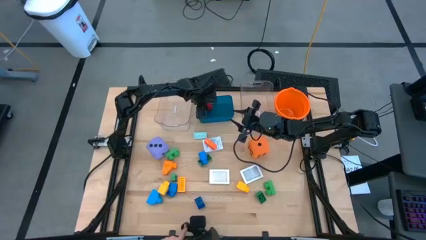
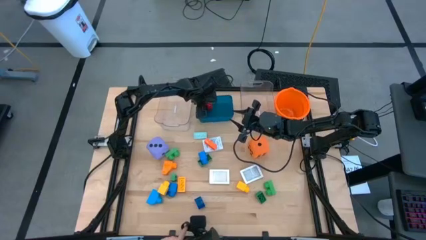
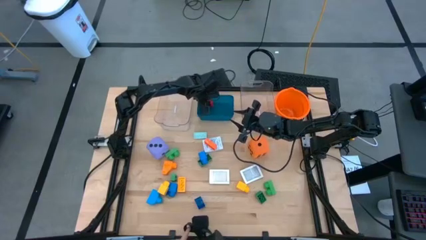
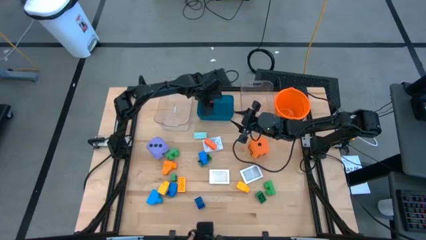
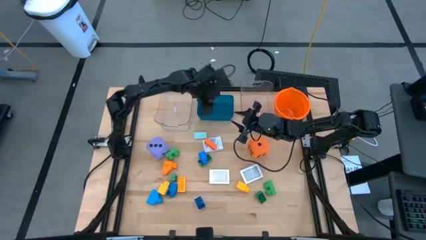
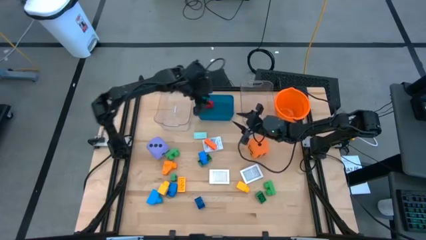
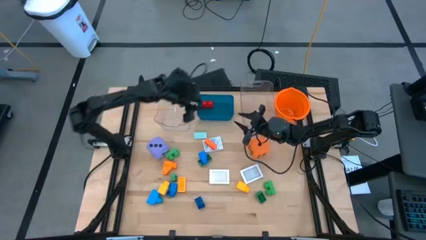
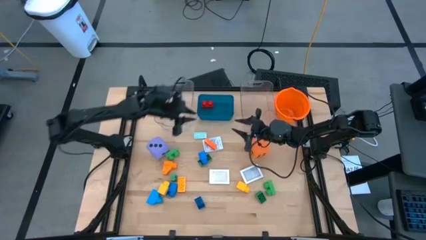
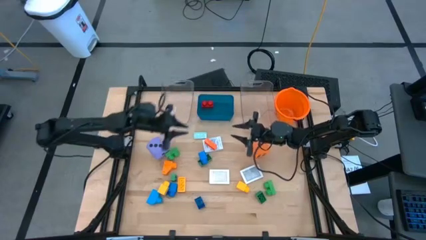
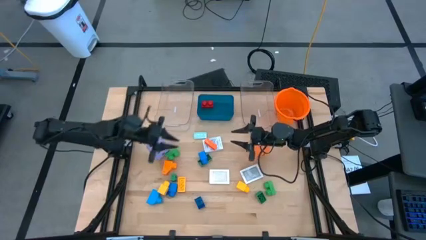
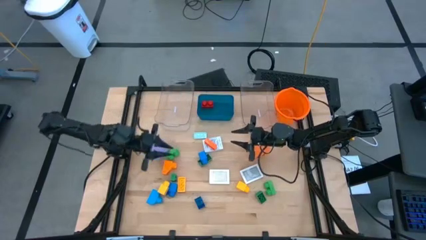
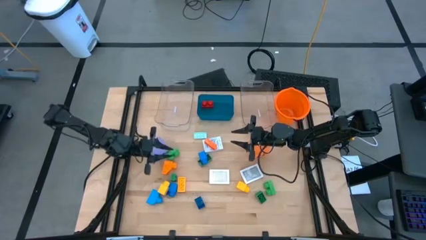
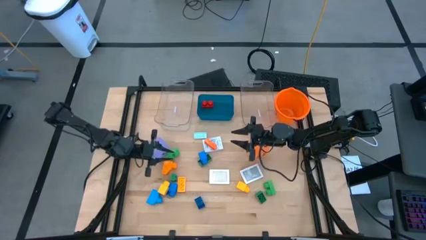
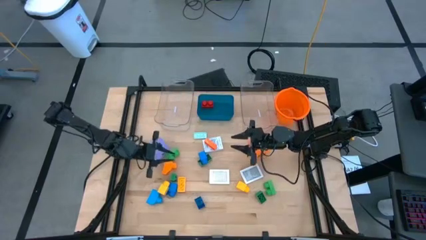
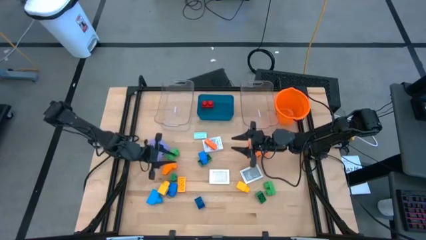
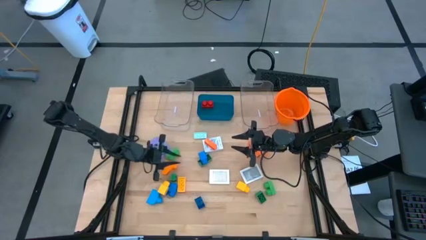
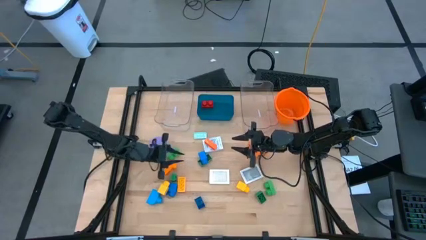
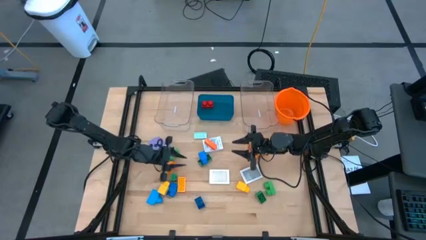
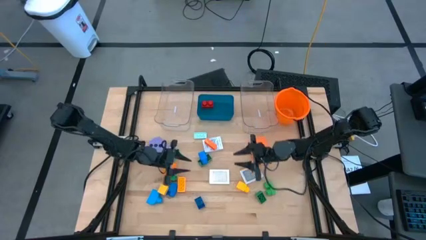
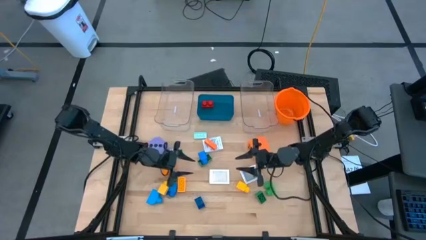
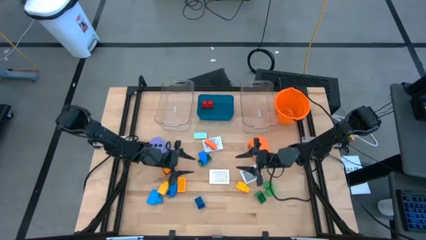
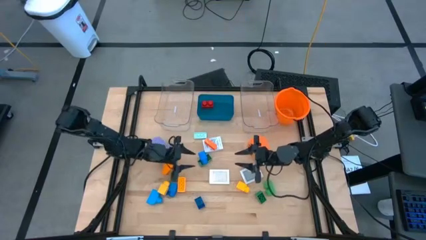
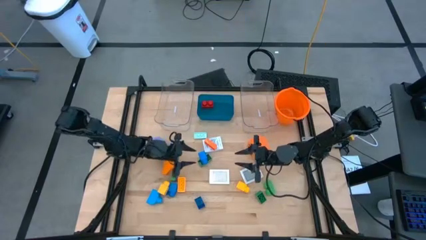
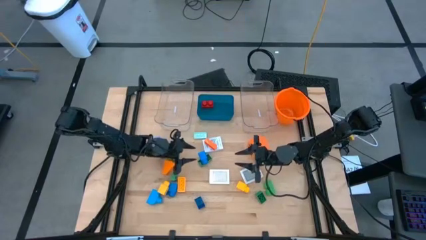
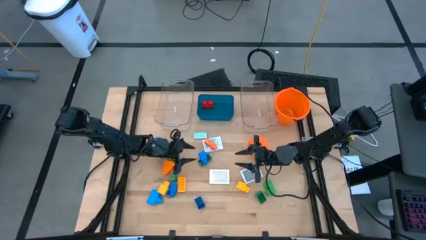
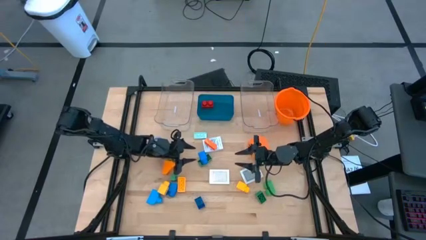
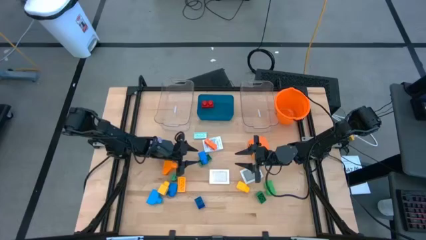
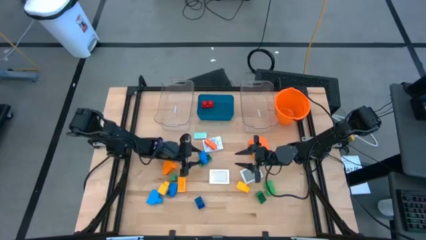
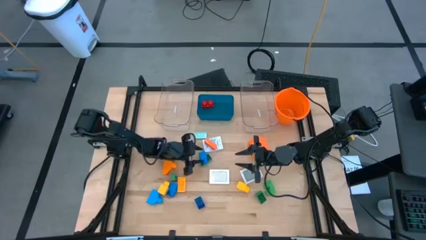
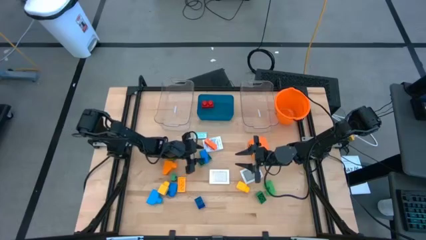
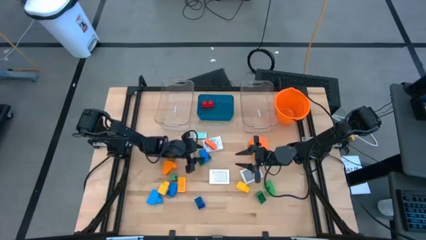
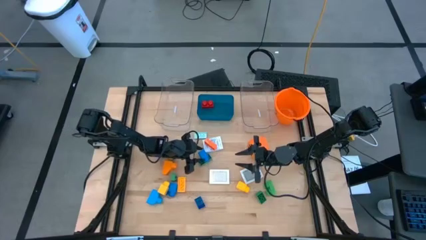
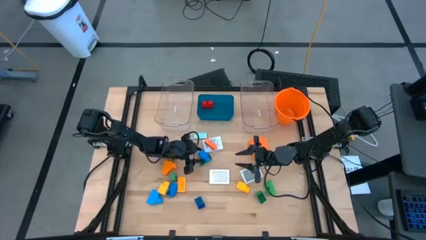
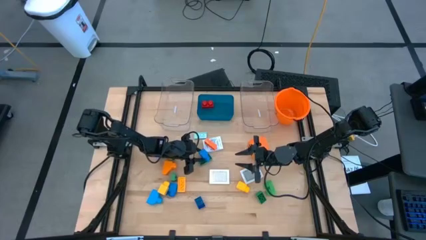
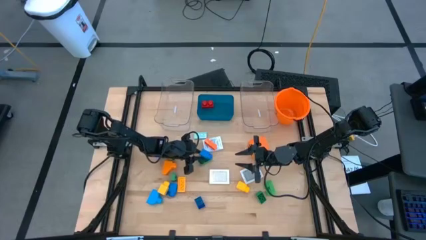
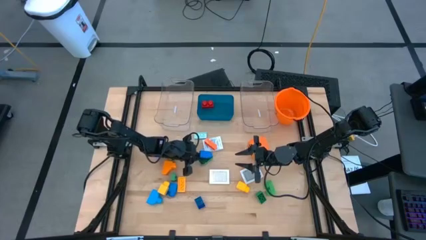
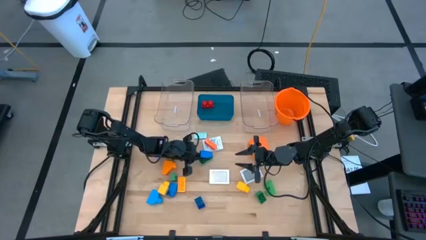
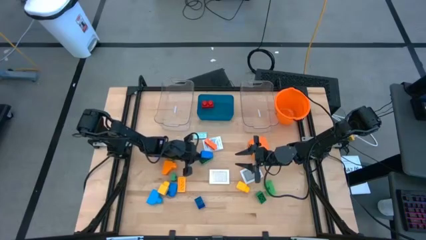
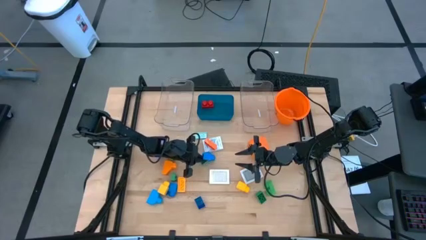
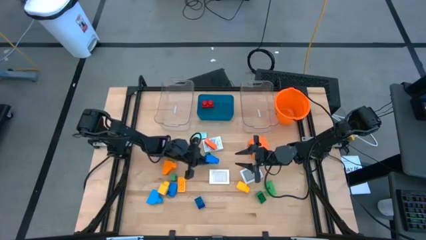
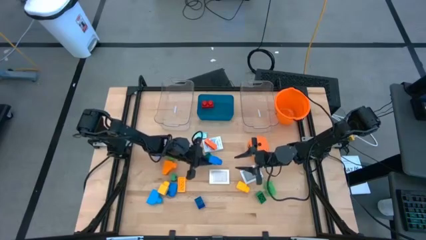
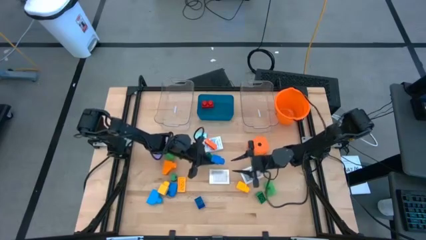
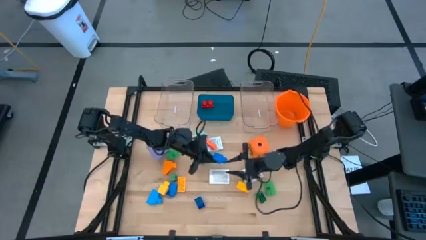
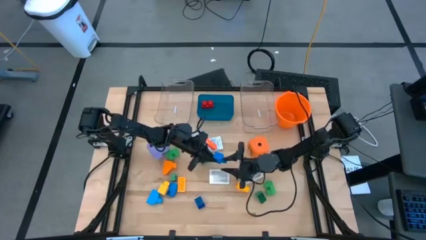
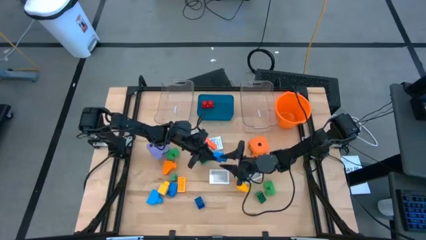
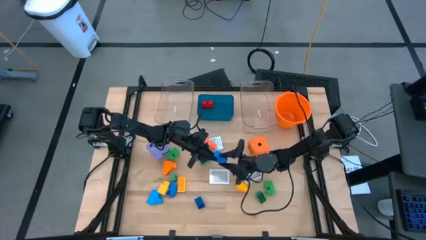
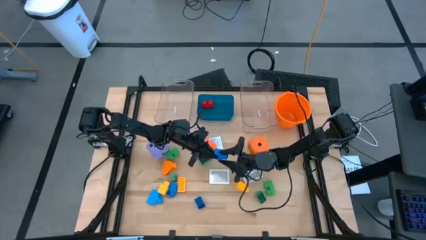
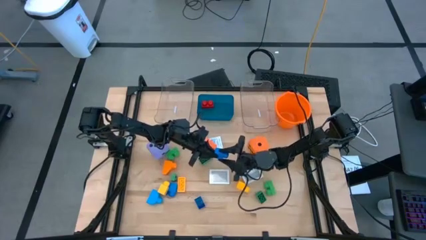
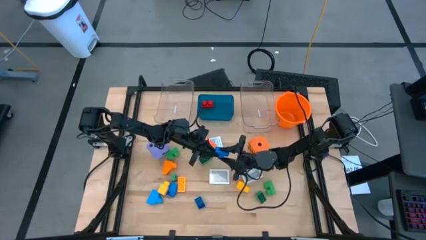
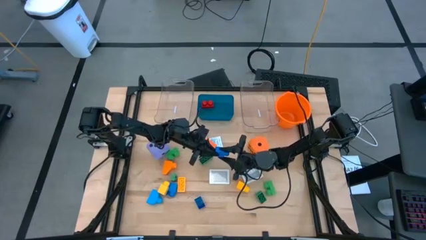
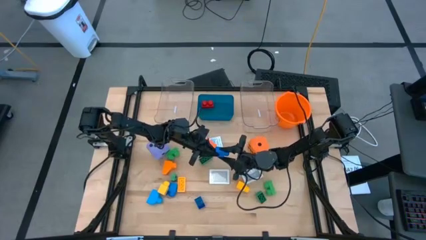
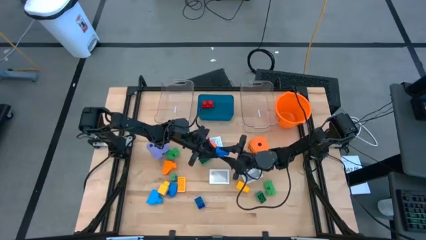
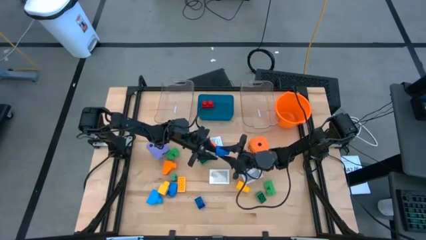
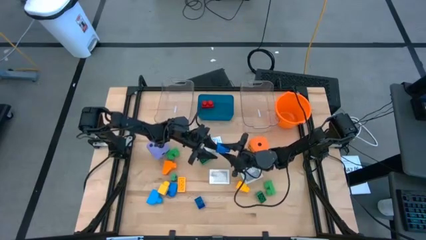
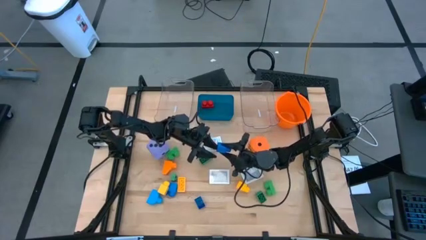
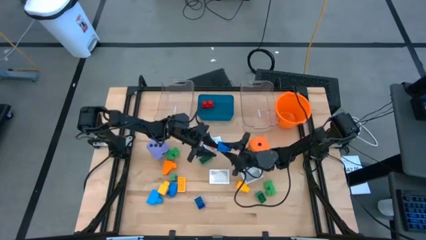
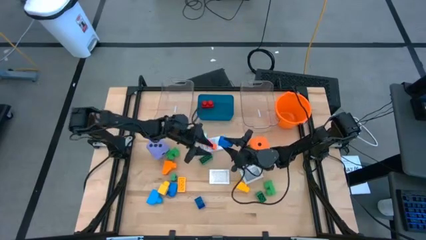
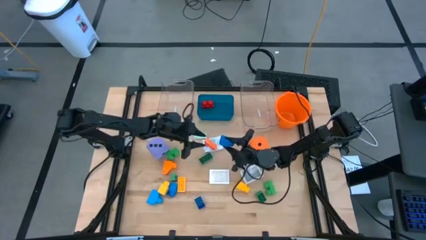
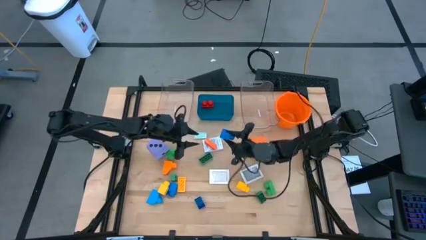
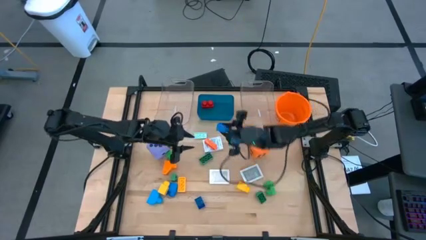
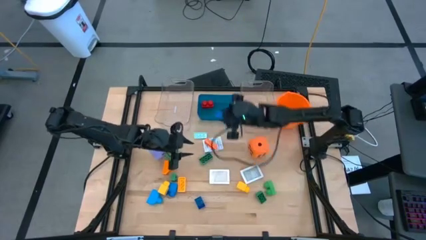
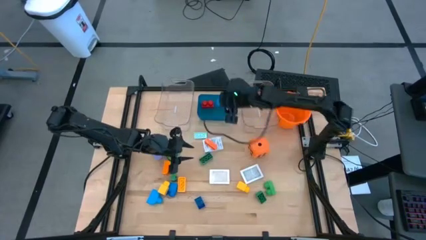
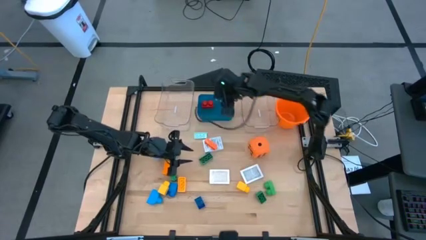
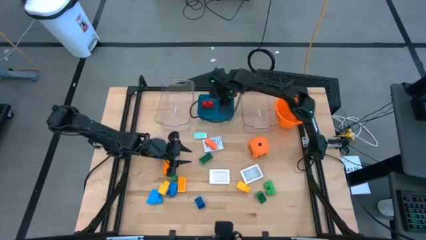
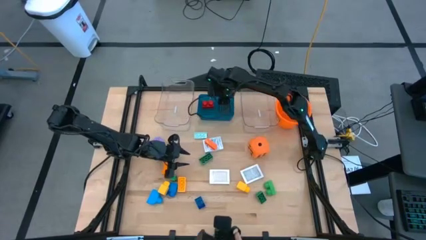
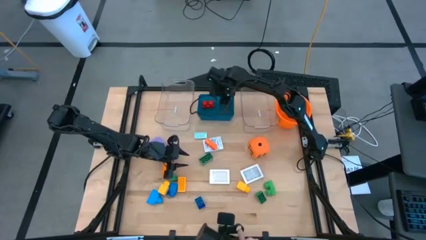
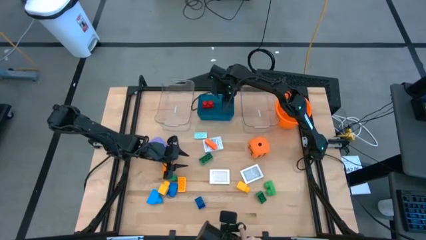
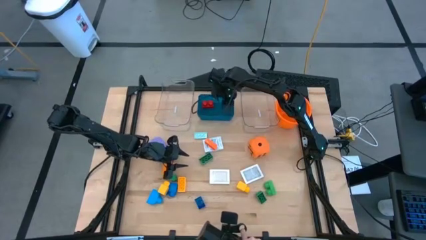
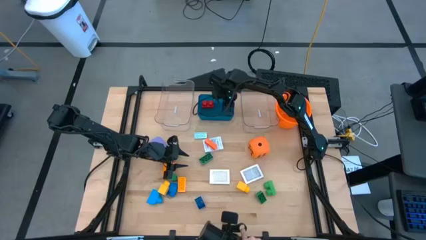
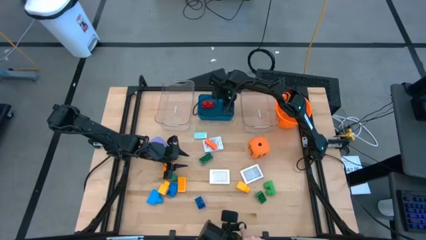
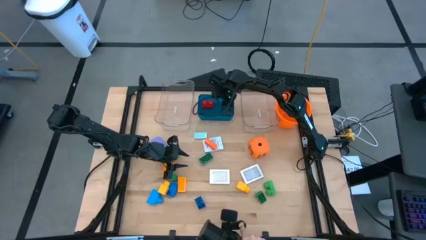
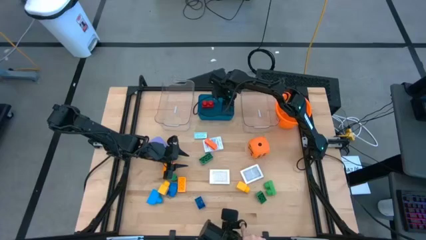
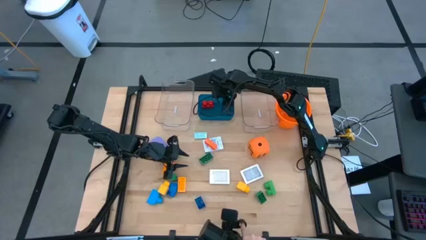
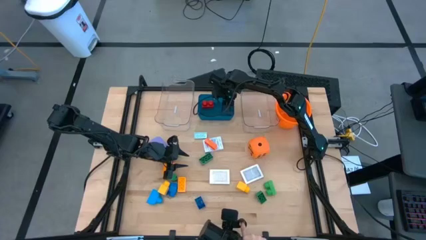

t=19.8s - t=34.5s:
Task: Pick & Place Toys
Put the blue game piece into the blue bin
